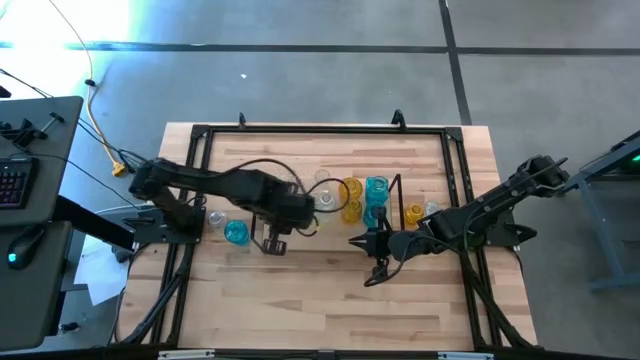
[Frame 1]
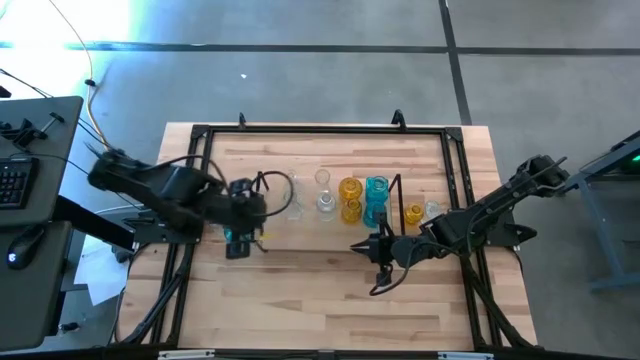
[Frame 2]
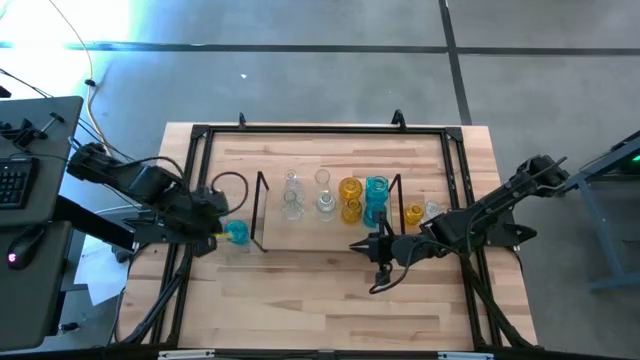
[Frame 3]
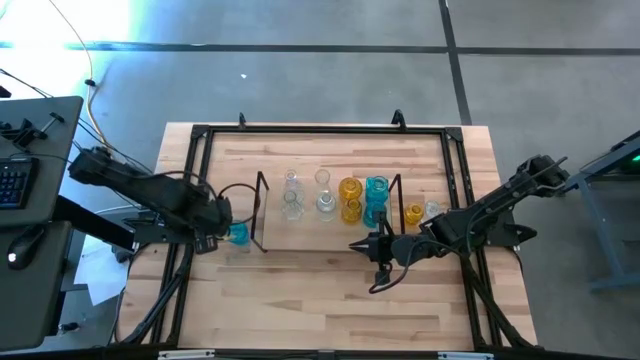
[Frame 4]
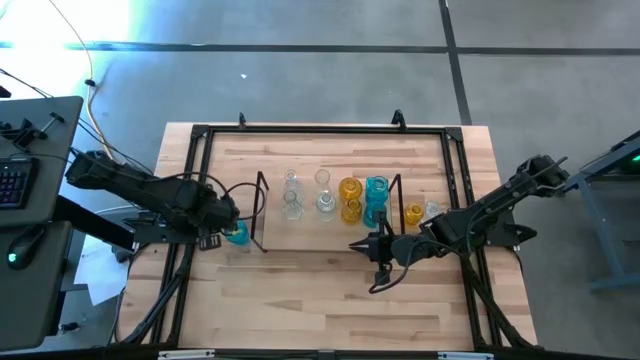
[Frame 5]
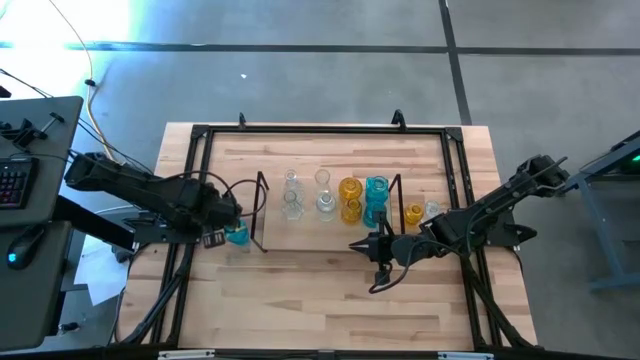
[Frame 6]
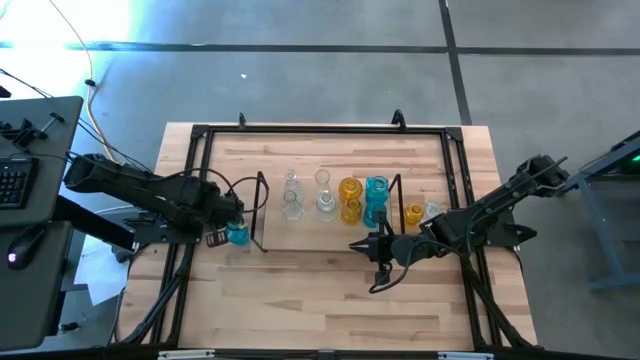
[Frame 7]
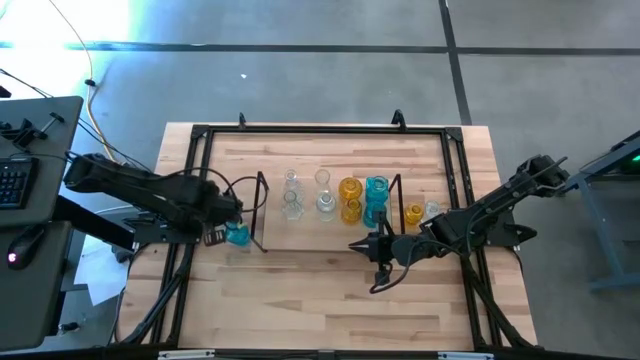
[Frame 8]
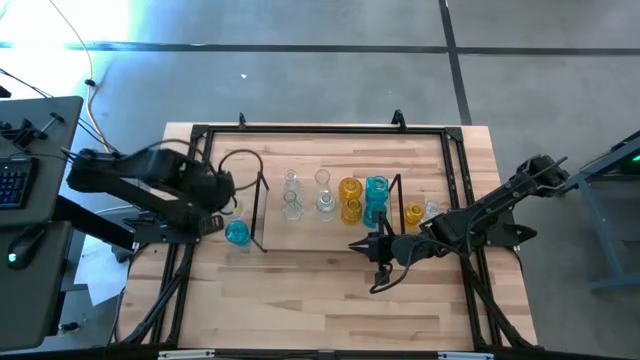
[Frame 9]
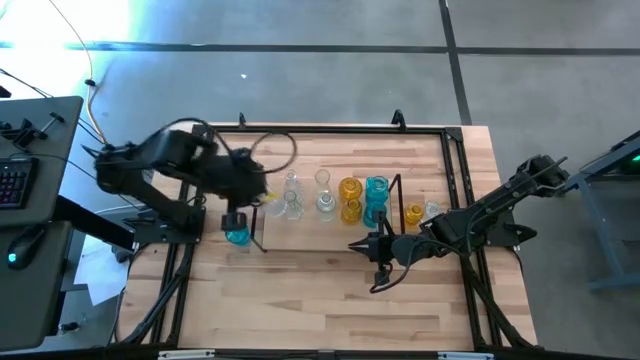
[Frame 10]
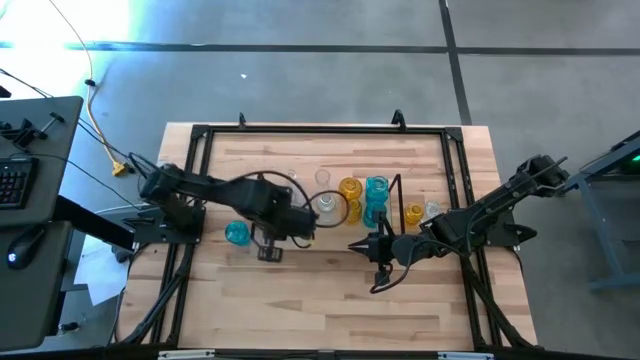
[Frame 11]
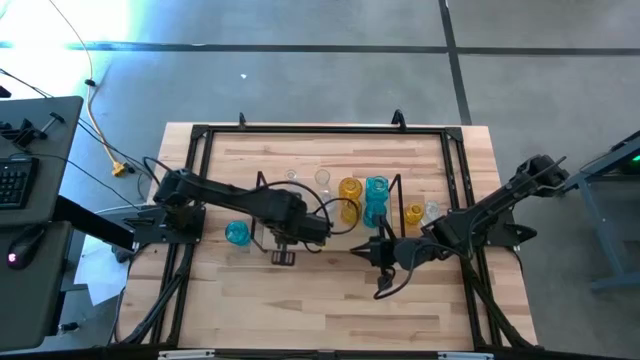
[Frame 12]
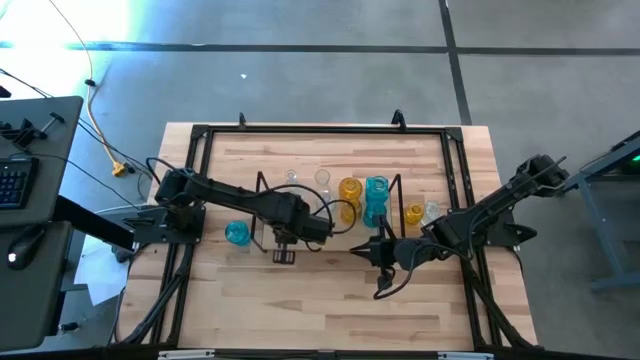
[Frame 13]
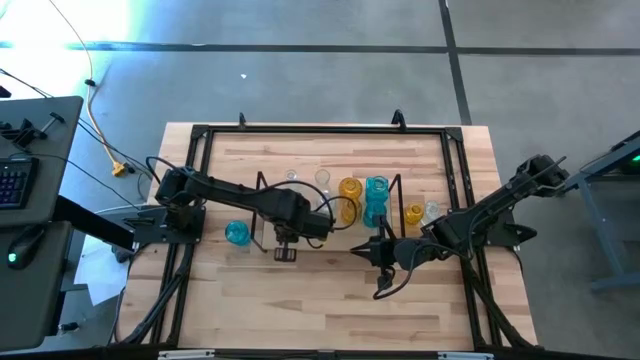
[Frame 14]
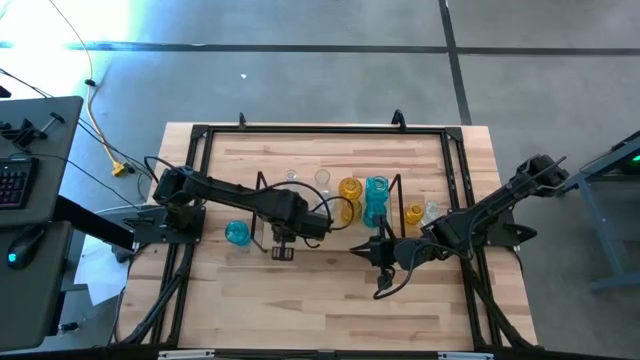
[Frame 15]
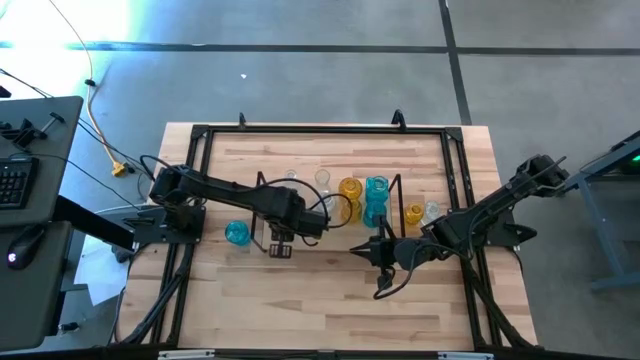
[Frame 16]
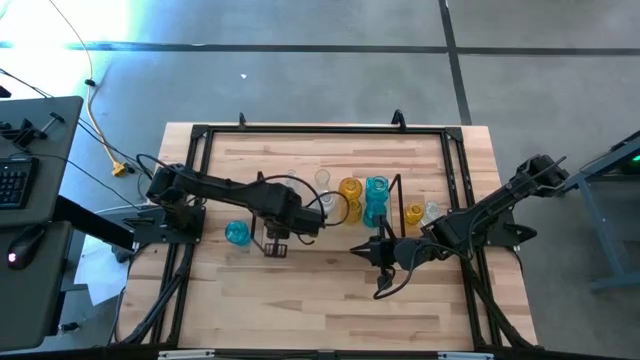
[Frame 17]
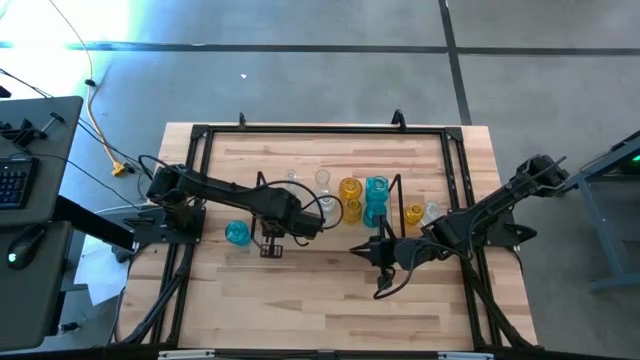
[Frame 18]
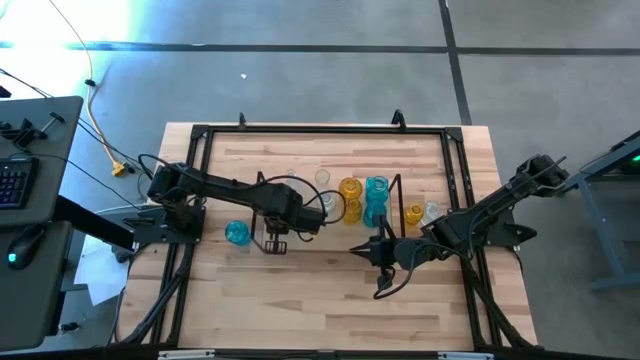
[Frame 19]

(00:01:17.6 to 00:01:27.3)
Task: sort vases onto shelf
Put the transparent vase on the shelf aligned with the other transparent vases

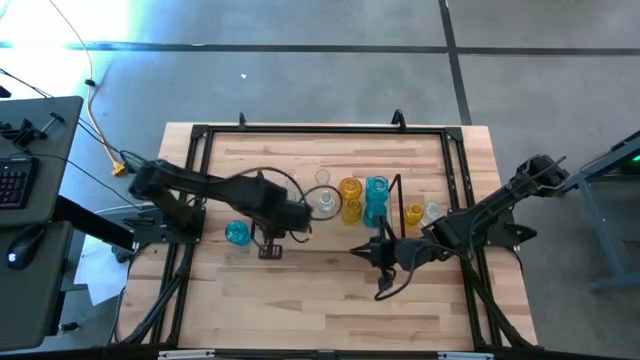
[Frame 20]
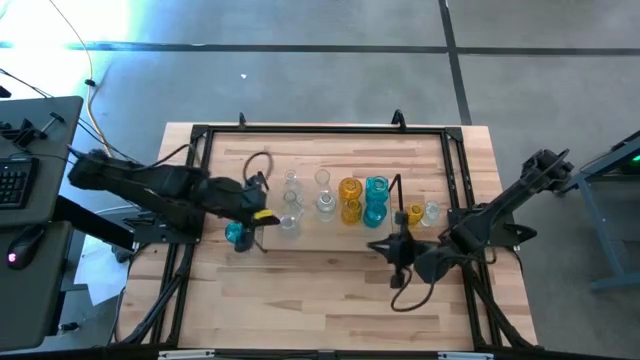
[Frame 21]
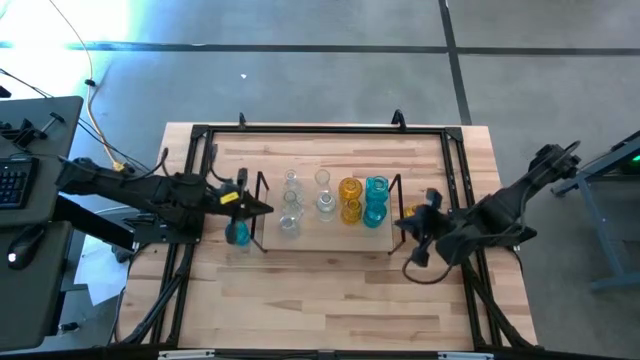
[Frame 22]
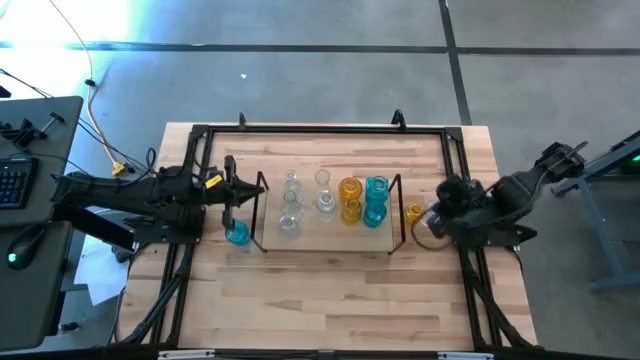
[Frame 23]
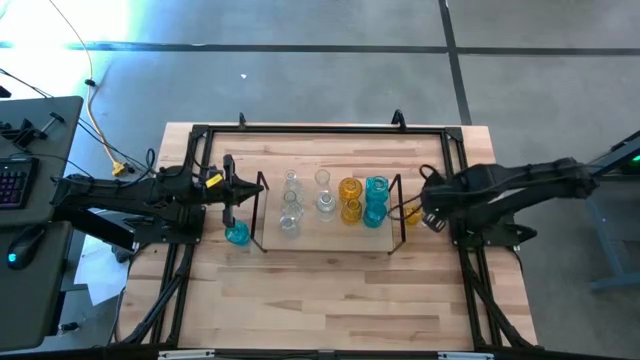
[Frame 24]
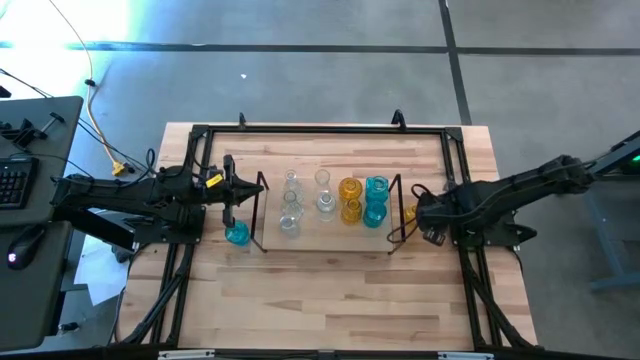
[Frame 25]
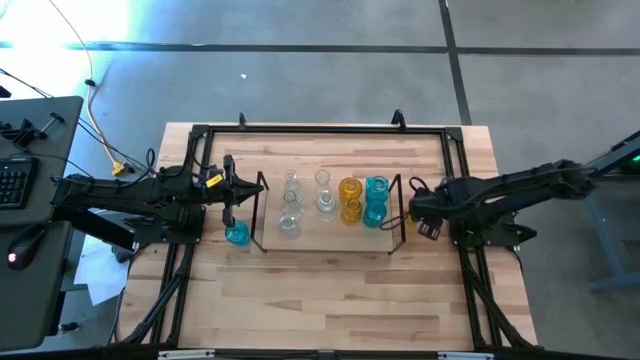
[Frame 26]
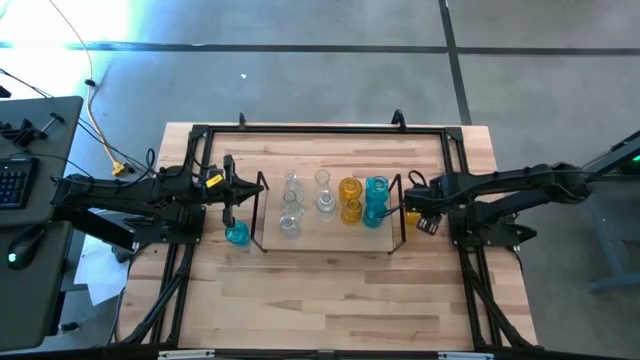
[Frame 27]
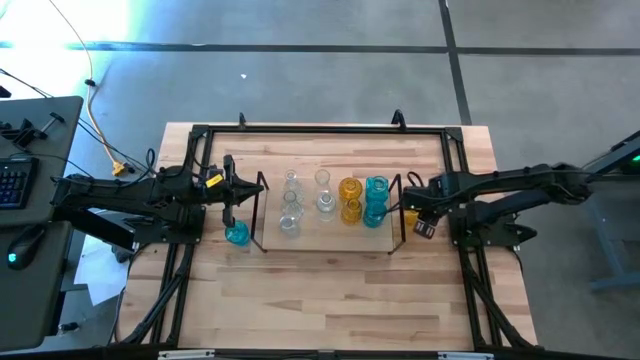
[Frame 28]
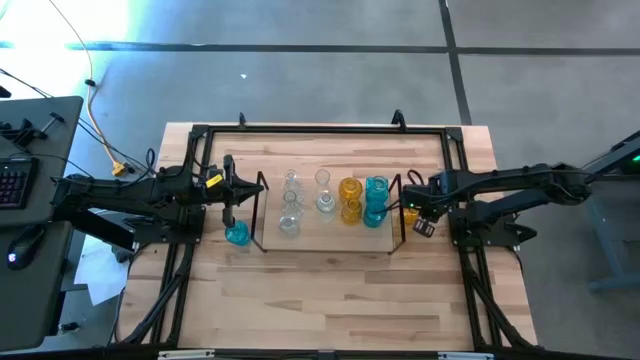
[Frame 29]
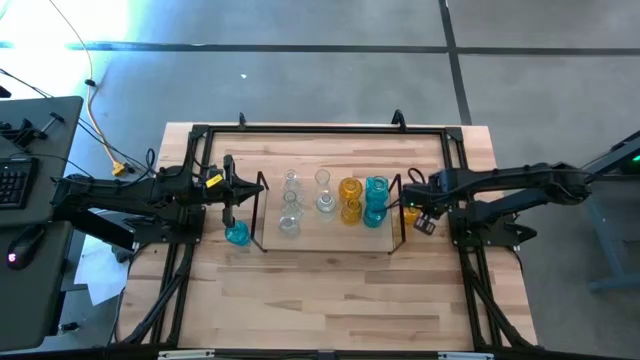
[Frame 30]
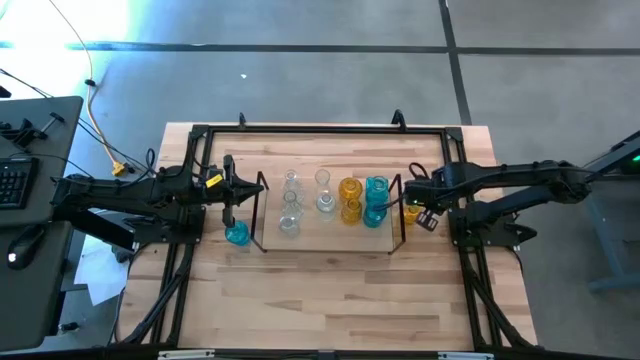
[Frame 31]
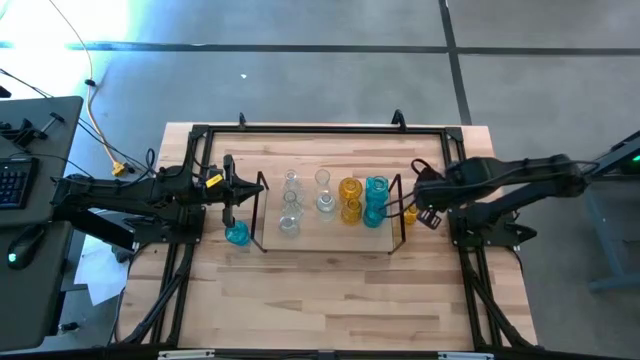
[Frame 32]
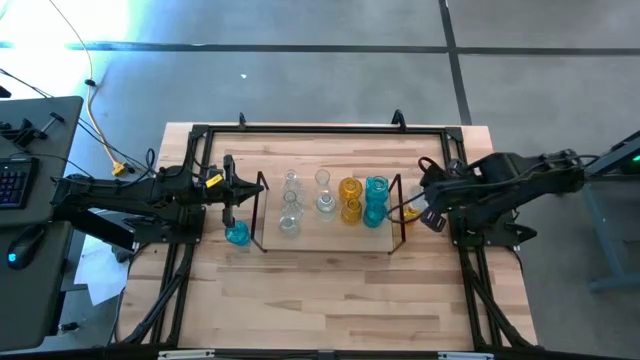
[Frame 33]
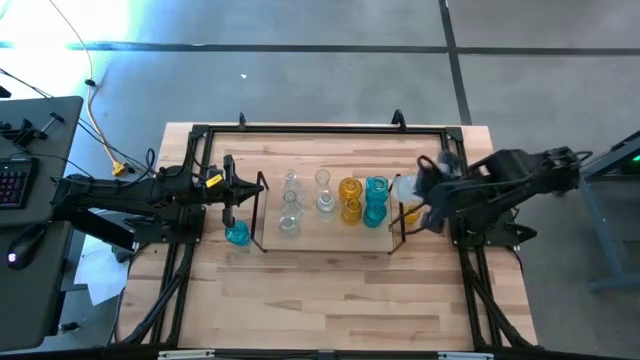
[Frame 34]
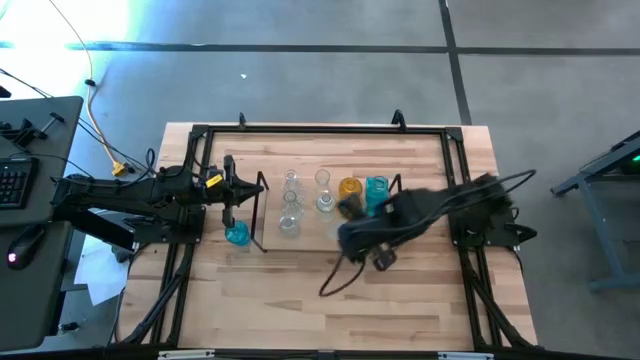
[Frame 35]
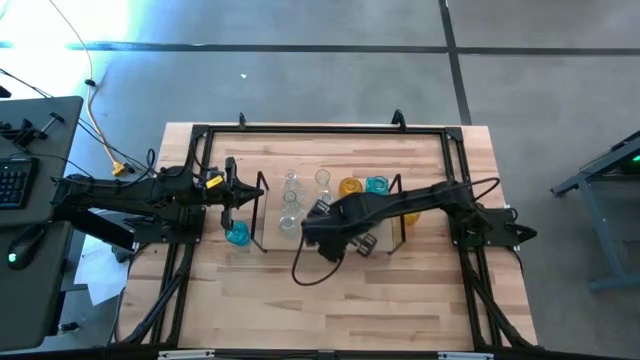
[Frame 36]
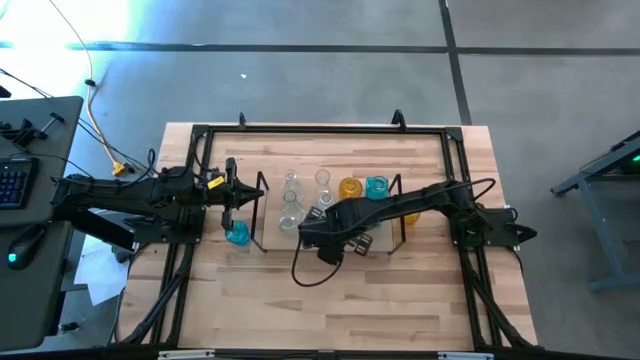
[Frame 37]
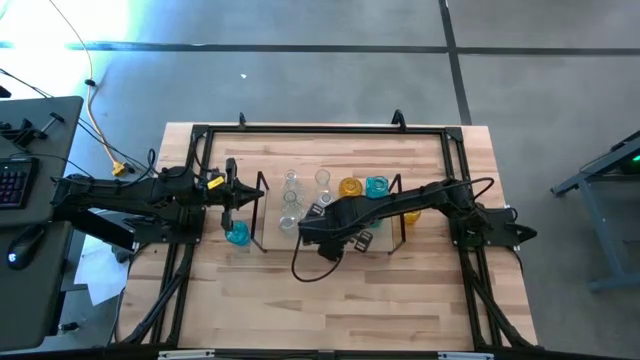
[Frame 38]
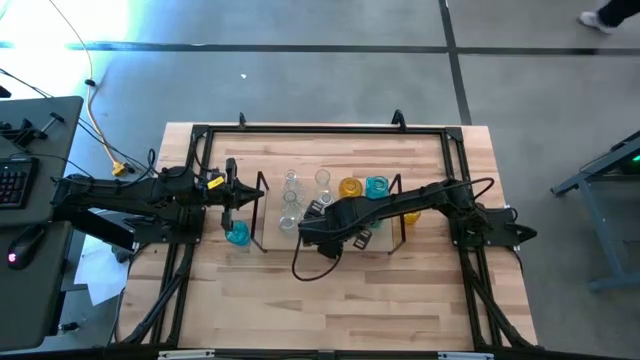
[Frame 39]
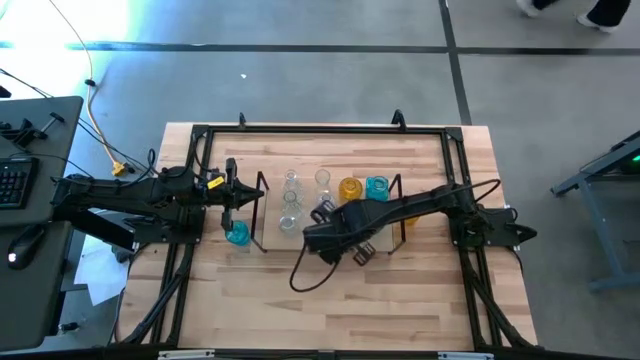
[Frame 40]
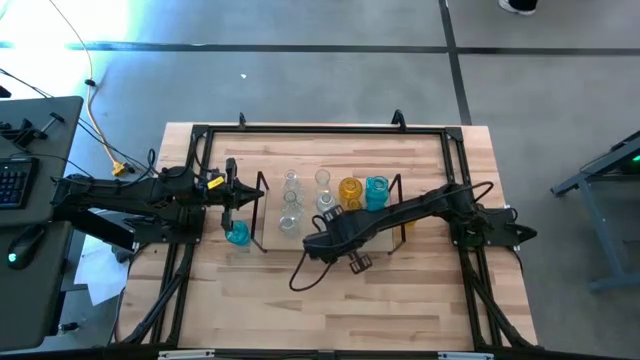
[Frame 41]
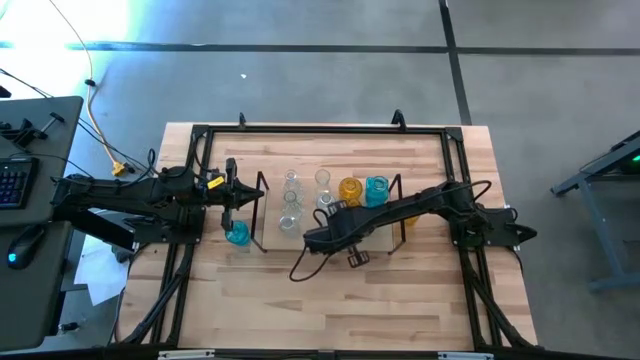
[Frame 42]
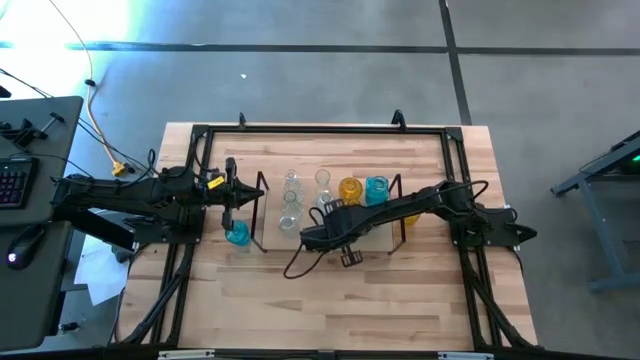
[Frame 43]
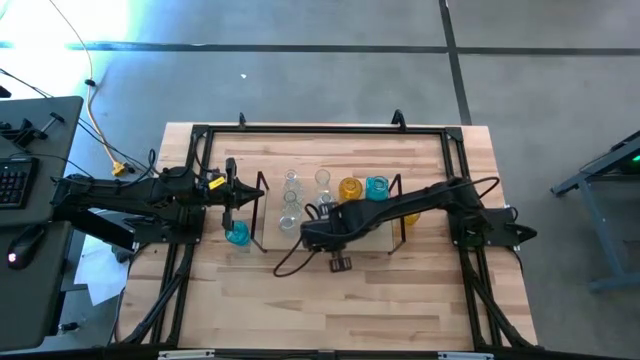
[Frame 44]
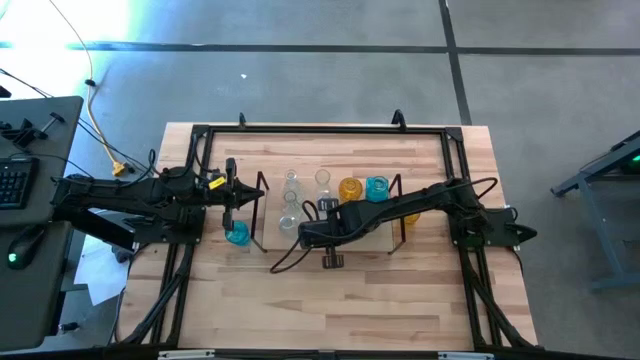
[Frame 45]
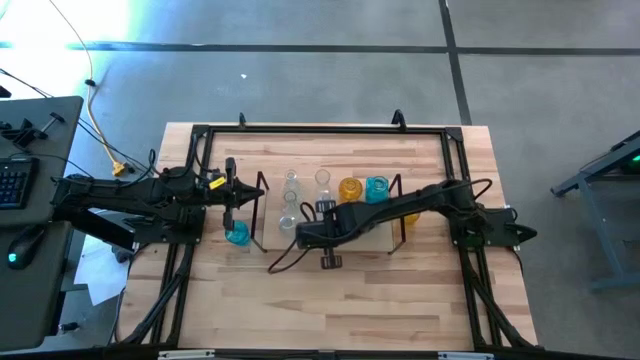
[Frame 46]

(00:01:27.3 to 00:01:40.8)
Put the transparent vase on the shelf aligned with the other transparent vases
